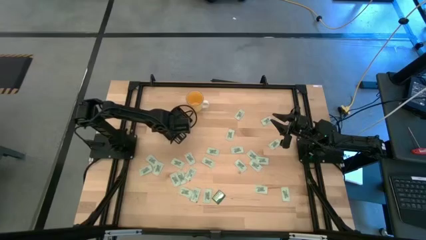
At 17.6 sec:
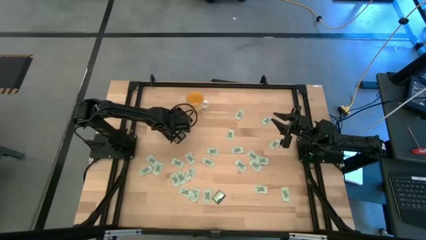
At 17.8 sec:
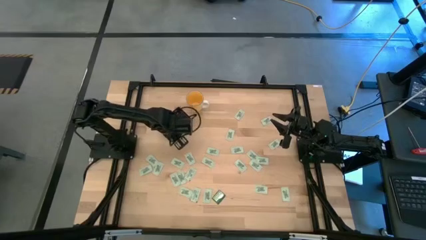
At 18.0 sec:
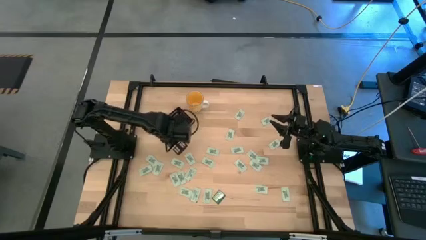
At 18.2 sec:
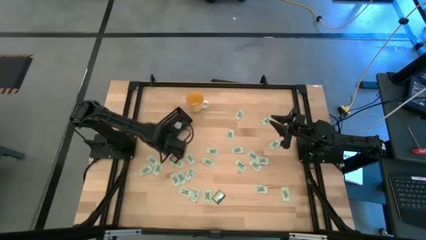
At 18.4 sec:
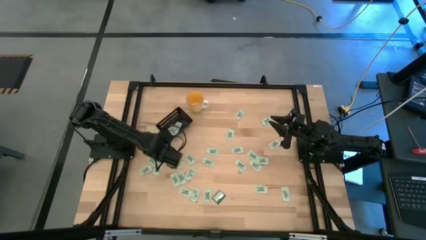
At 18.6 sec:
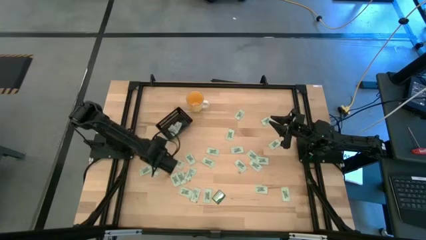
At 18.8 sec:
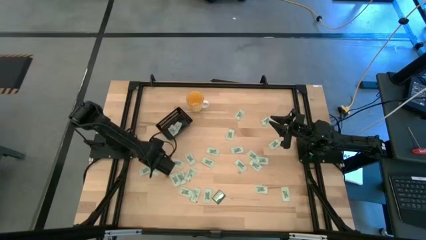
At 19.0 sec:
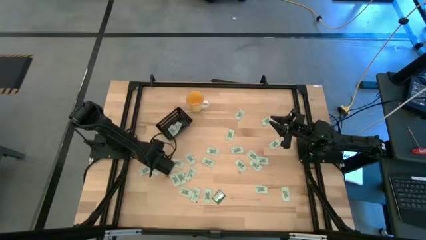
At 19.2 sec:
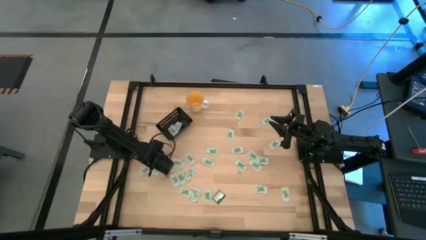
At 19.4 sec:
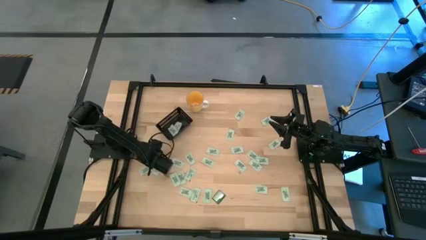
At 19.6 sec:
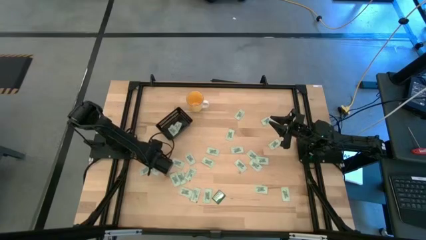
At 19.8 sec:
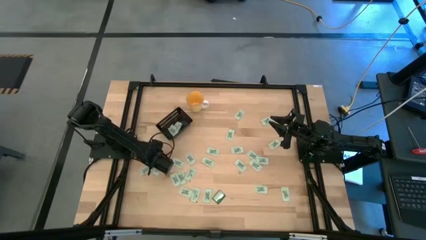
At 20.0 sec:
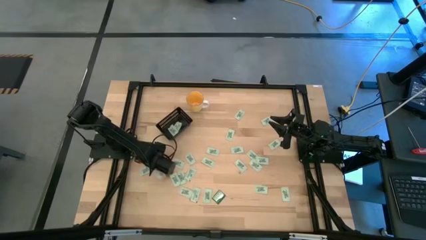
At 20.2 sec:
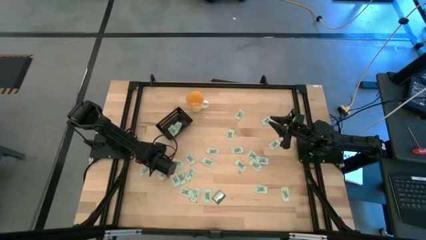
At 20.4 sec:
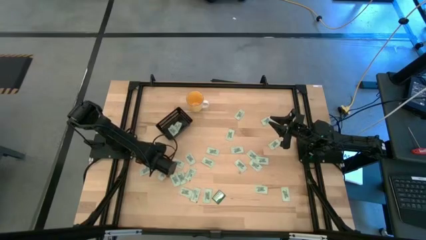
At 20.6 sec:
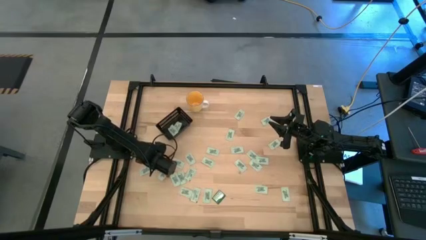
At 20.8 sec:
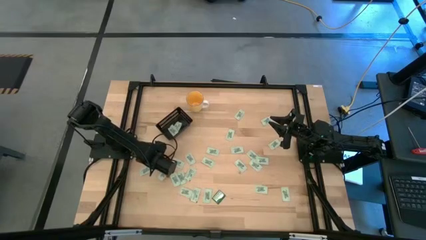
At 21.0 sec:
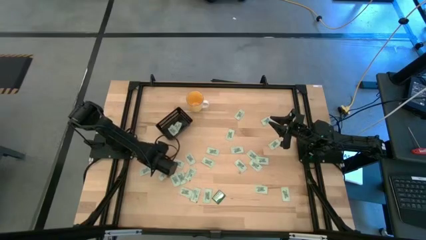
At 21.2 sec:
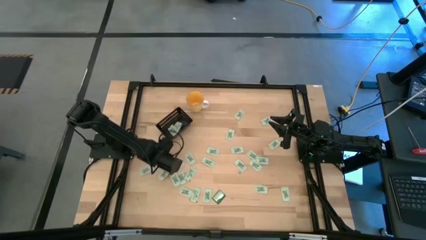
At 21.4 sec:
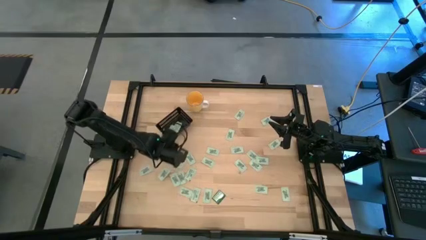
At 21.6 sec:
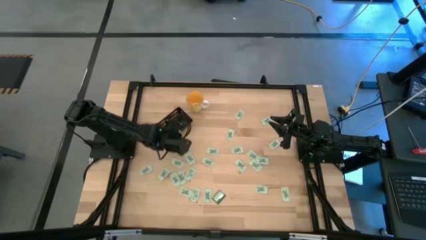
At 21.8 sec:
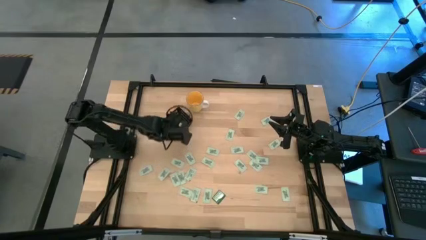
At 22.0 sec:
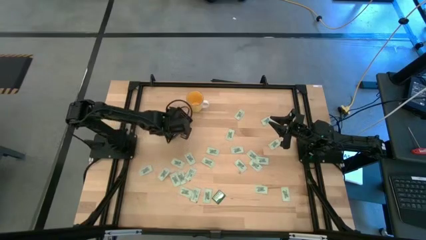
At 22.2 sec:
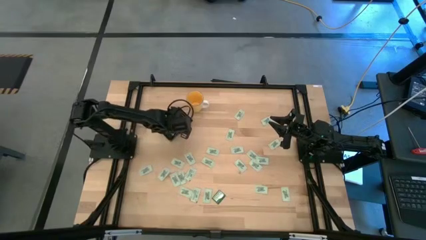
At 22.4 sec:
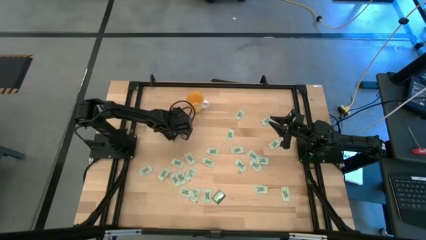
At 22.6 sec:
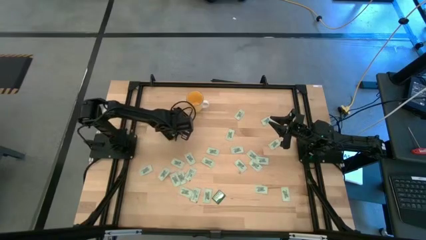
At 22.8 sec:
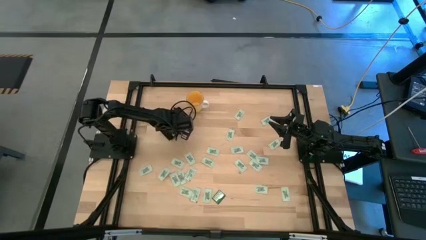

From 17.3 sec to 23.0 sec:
Task: Pick and place Stevia / Truvia into bins
Put the green stevia packet into the black bin

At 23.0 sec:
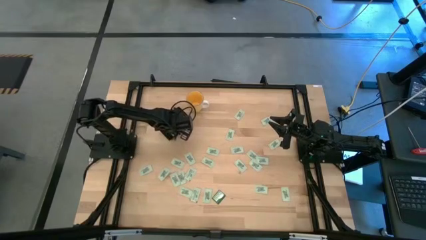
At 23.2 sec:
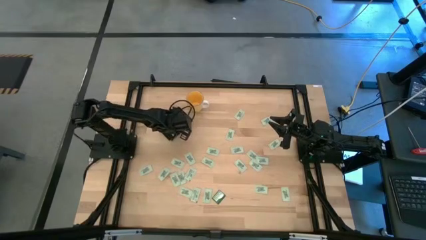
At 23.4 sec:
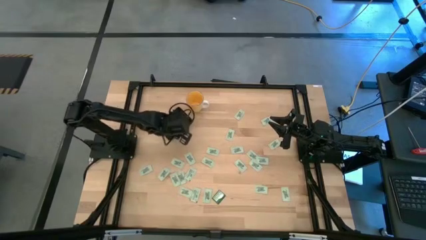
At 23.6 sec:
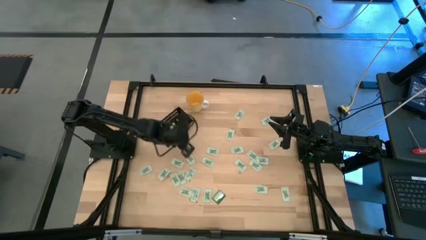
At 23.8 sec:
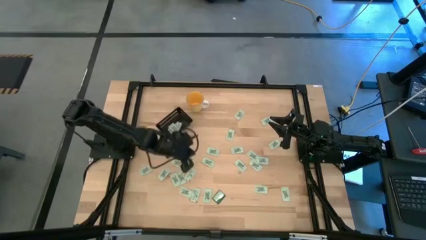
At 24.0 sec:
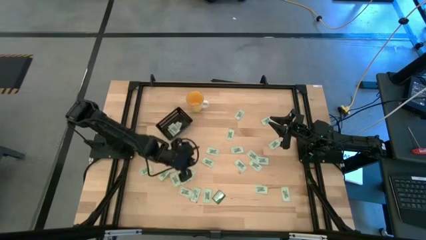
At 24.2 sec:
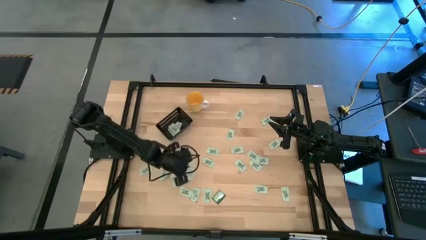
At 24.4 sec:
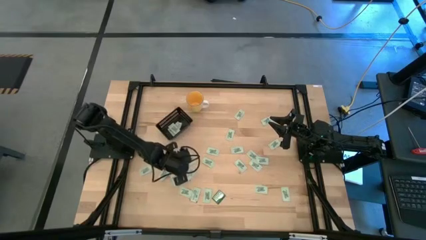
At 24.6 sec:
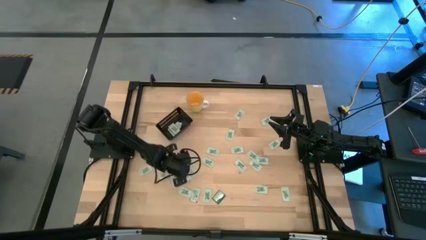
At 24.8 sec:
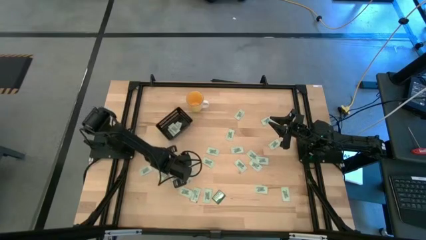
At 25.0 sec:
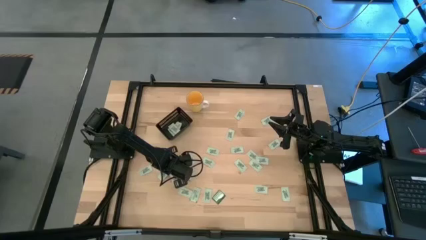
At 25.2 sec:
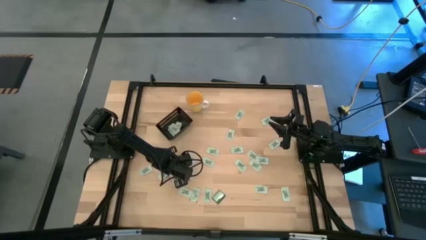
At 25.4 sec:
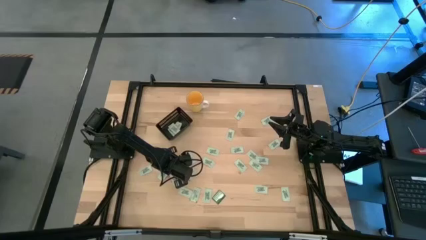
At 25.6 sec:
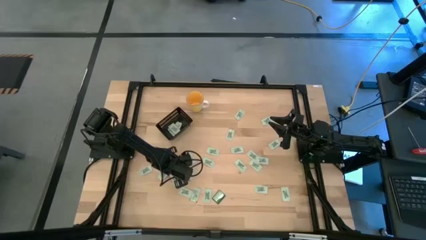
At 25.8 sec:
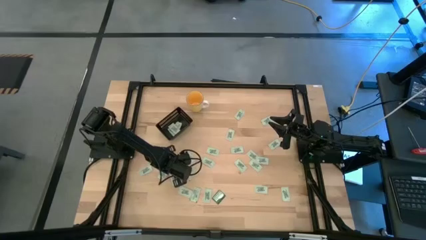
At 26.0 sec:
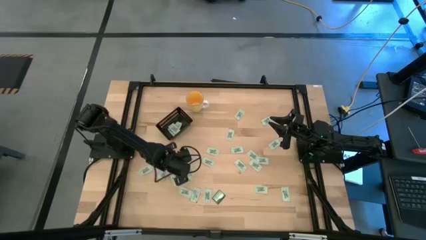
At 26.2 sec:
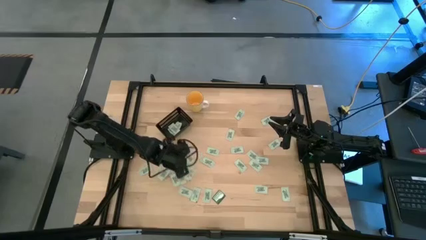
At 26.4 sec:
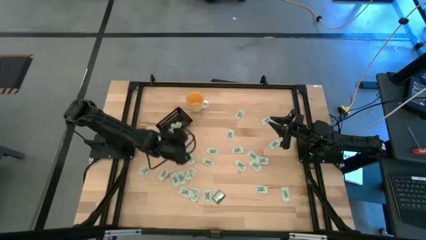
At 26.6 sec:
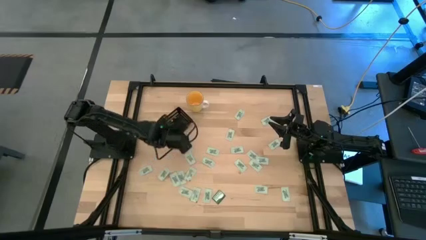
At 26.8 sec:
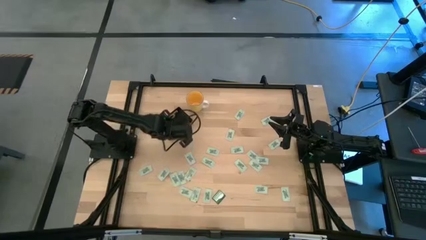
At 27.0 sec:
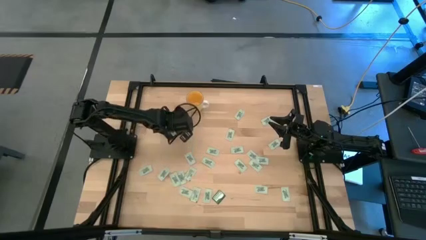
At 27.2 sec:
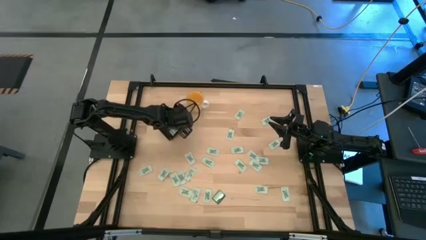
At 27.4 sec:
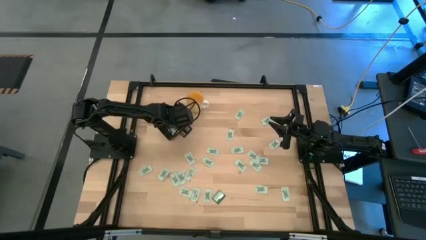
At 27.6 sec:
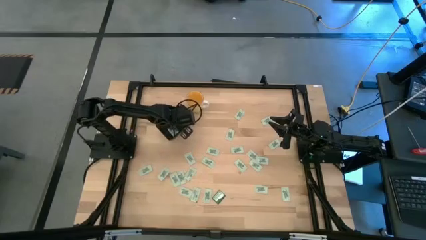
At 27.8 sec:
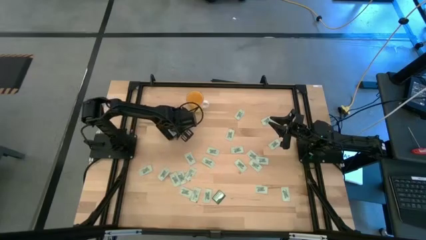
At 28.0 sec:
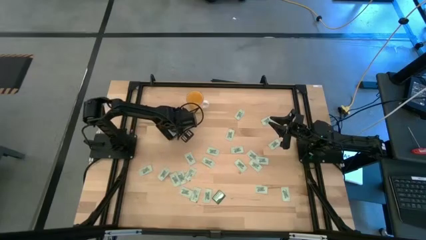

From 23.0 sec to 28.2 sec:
Put the green stevia packet into the black bin

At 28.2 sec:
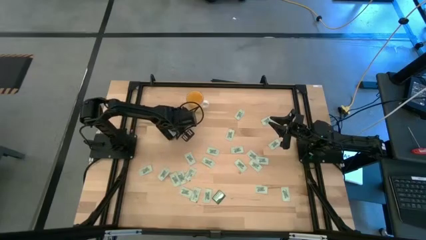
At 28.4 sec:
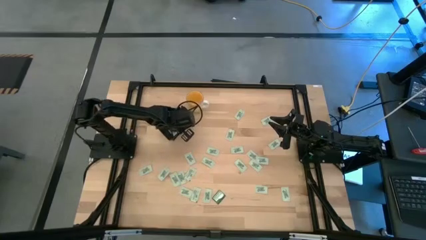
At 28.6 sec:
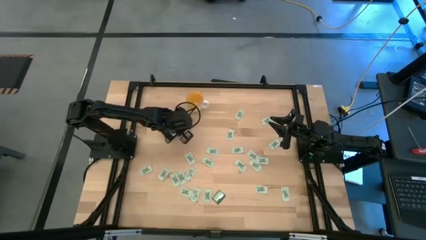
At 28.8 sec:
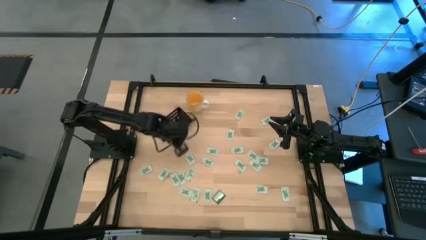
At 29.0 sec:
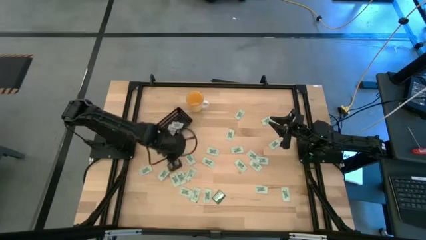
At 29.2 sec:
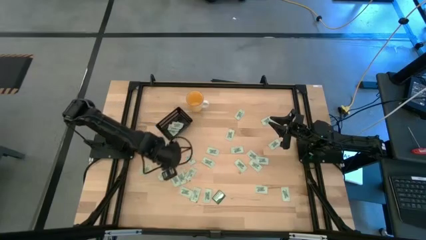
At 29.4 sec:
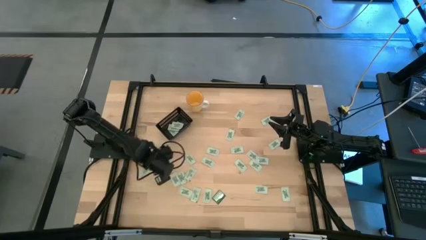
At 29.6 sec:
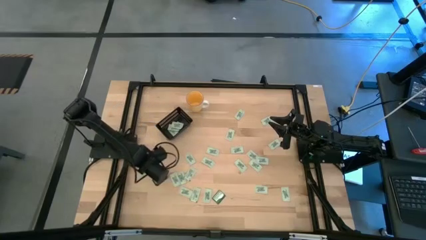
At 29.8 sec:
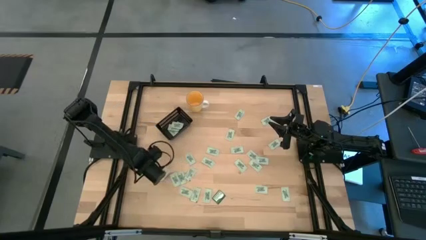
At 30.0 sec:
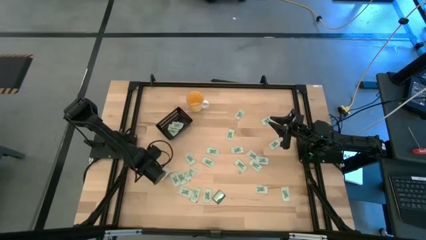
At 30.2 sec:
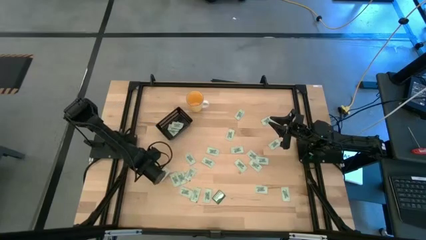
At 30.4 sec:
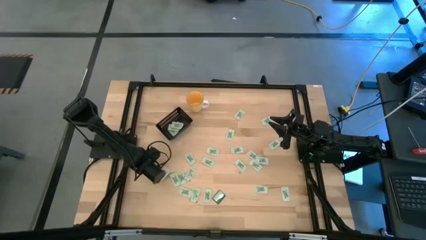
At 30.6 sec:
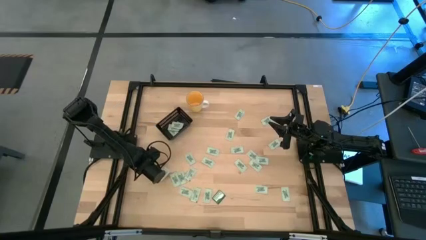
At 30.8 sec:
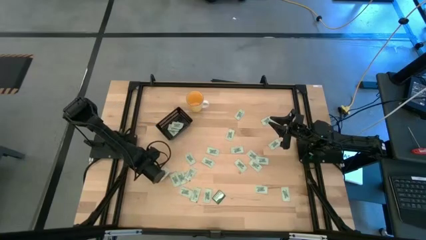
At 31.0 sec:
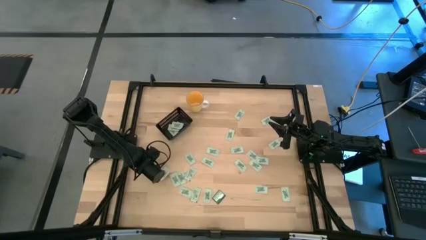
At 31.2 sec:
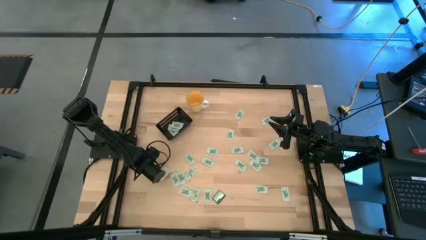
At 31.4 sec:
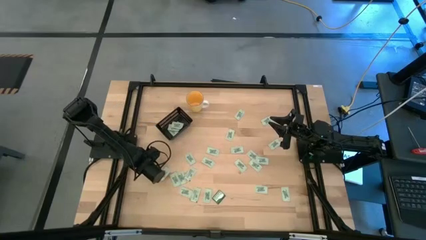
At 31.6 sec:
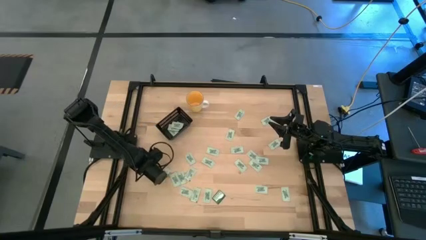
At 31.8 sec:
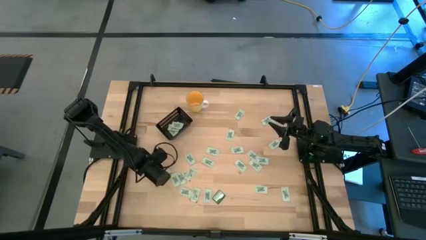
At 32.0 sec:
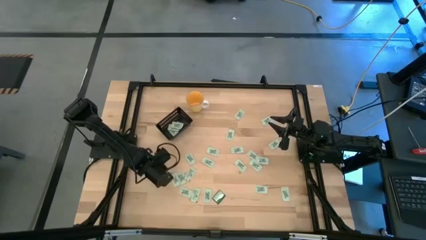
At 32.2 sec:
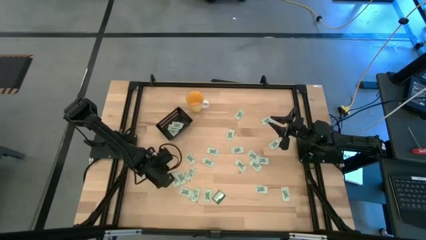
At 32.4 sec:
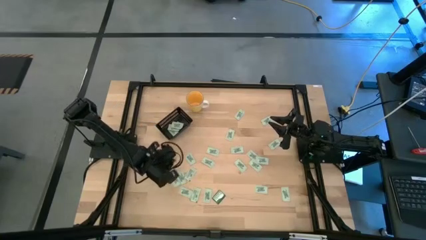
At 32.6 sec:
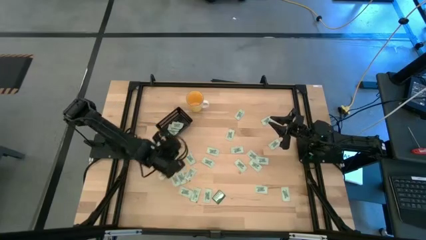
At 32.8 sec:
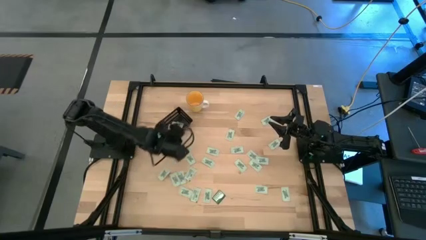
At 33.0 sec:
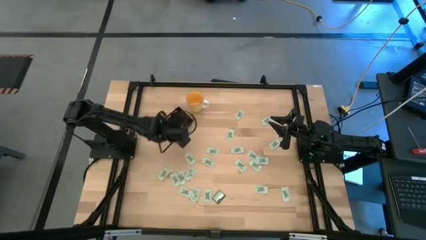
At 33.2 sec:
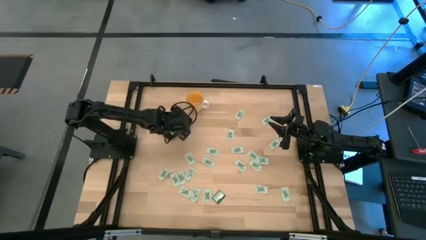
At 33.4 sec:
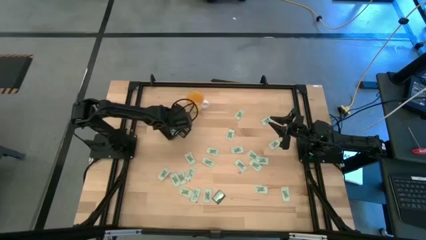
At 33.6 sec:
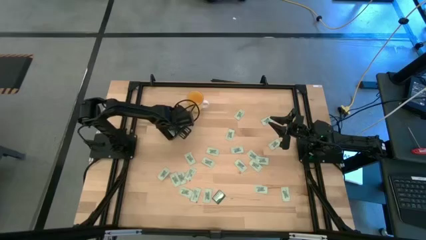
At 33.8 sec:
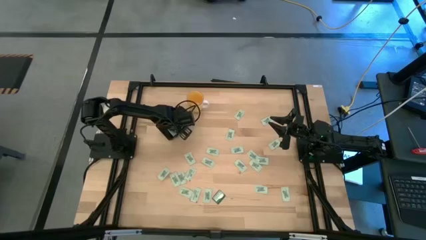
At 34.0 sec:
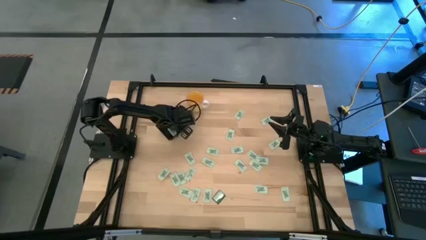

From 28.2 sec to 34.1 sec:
Put the green stevia packet into the black bin
